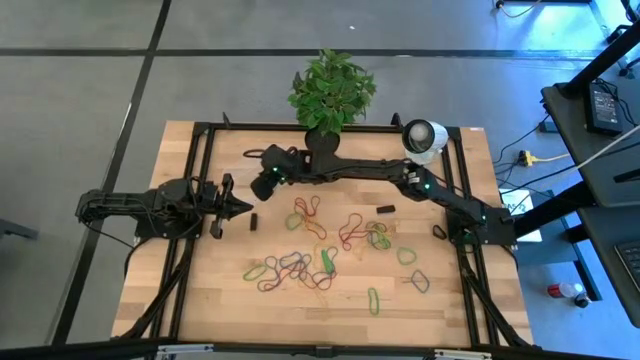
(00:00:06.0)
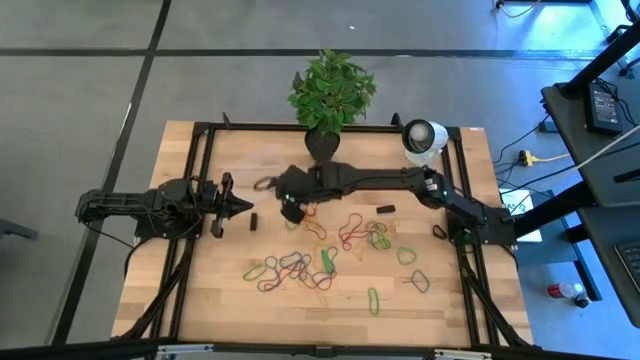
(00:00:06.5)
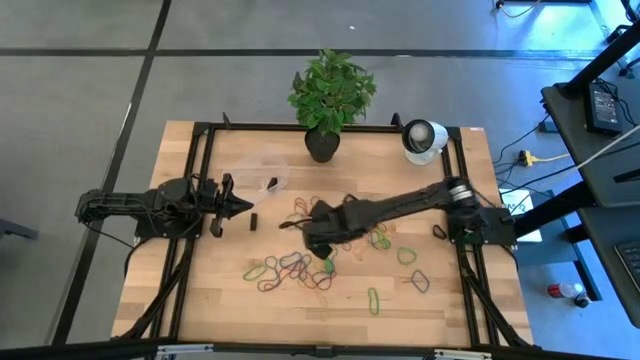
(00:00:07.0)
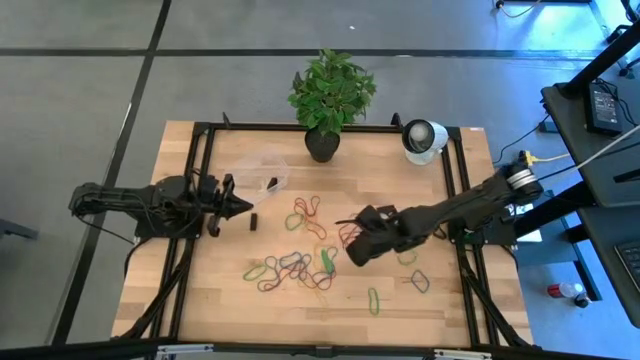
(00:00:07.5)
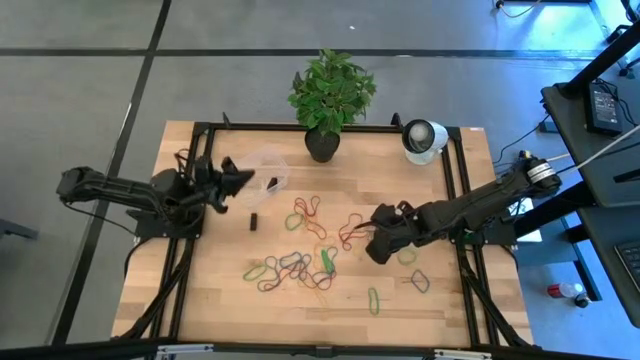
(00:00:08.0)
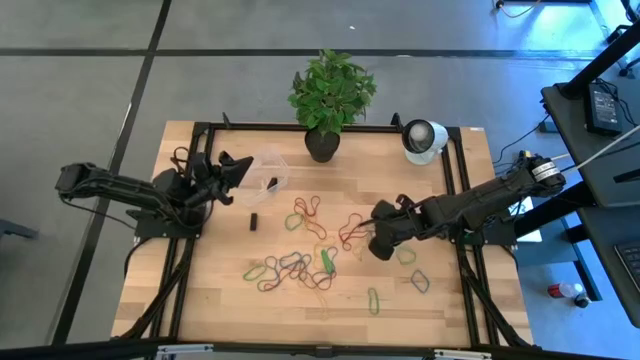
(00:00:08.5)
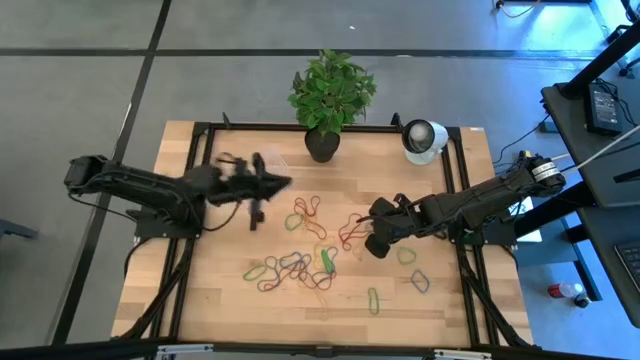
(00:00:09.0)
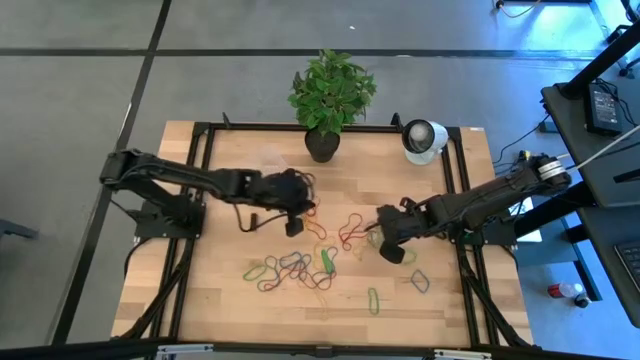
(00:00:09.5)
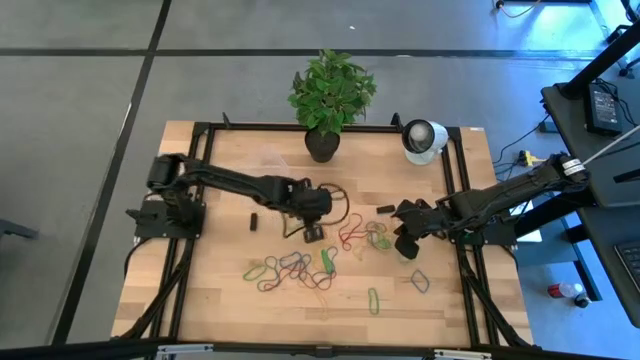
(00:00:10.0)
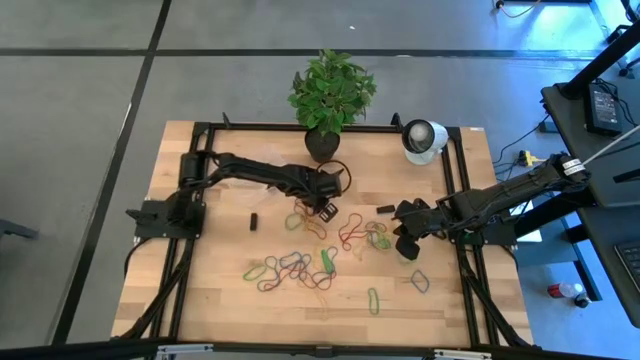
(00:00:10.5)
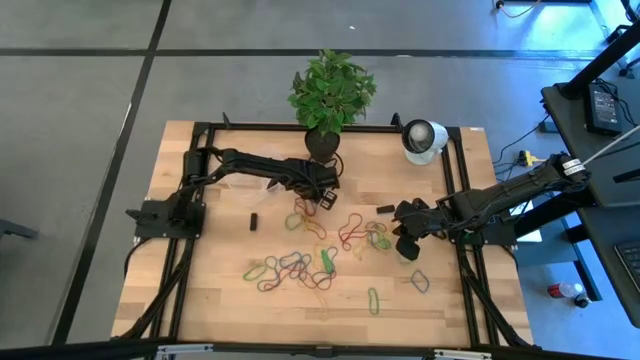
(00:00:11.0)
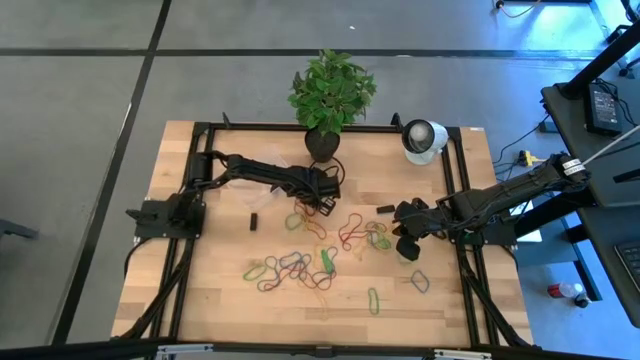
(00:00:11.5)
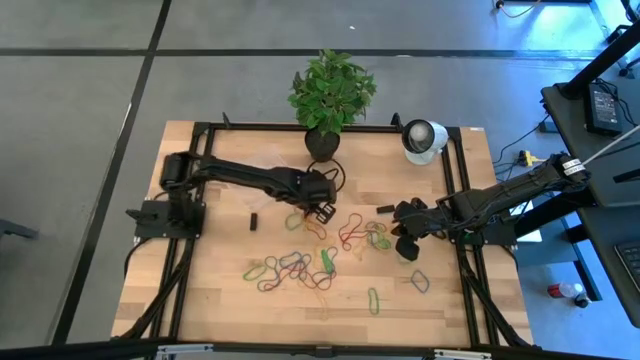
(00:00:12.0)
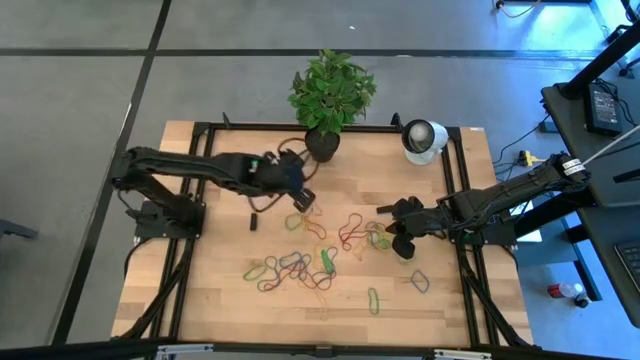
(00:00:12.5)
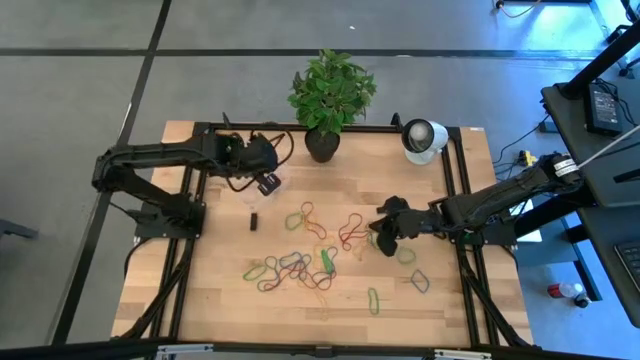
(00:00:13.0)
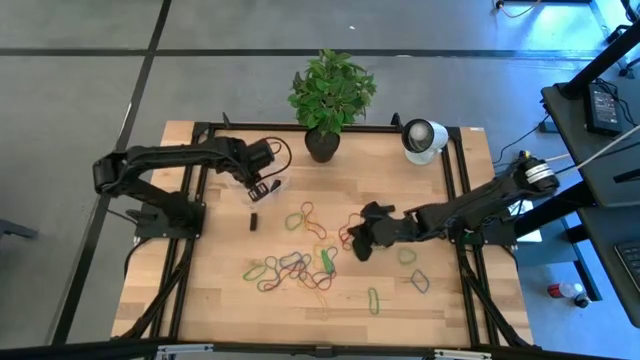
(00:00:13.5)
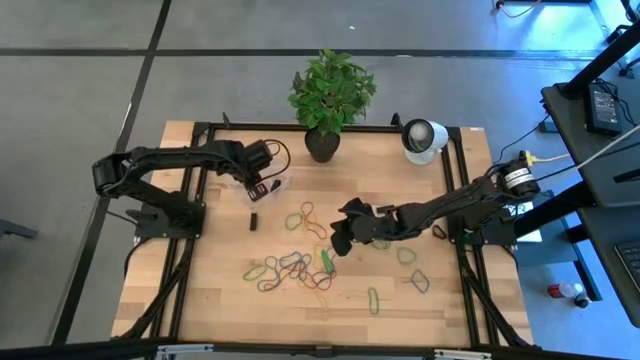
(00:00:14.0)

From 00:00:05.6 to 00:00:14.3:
Task: Pick and place rubber bands into bin
Put the red rubber band into the transparent bin

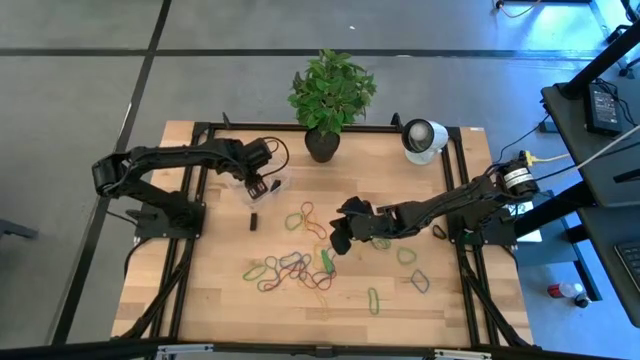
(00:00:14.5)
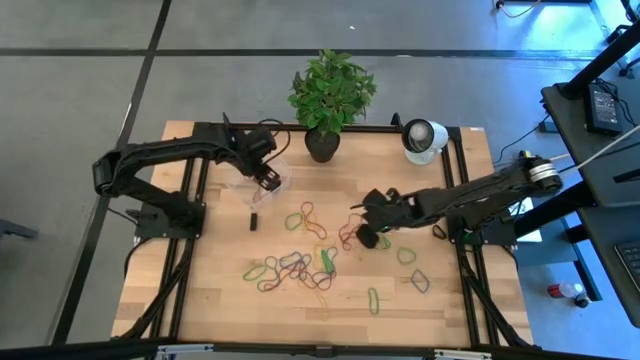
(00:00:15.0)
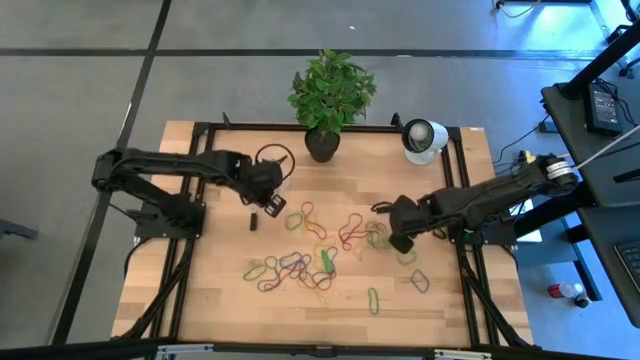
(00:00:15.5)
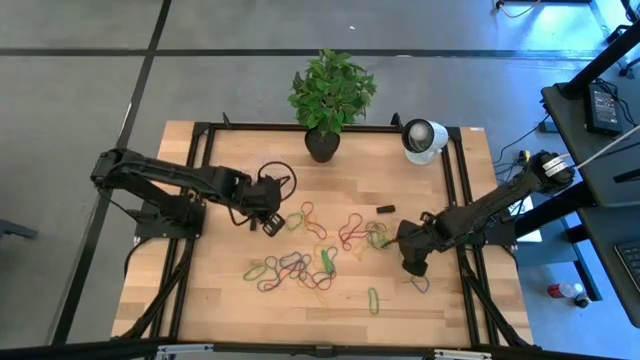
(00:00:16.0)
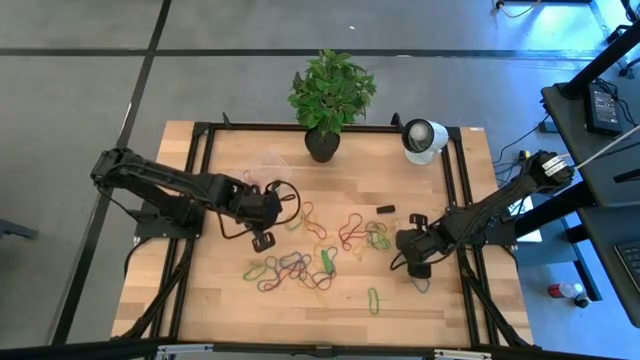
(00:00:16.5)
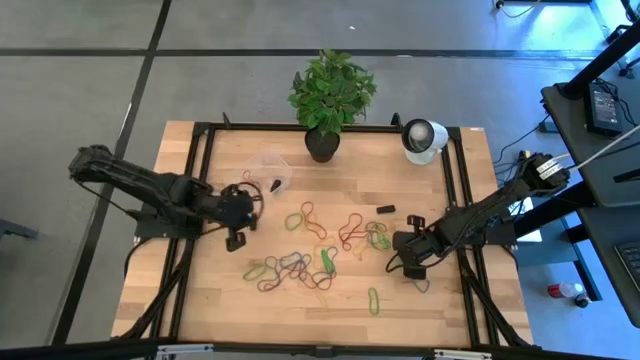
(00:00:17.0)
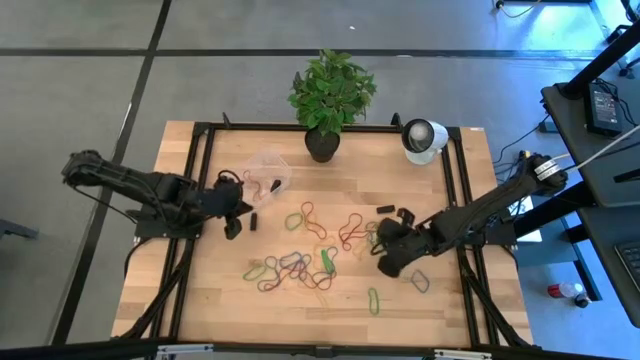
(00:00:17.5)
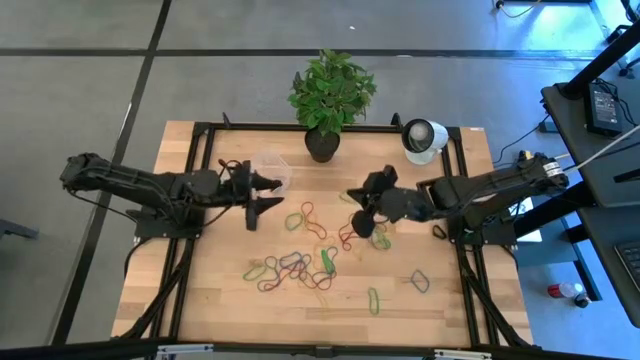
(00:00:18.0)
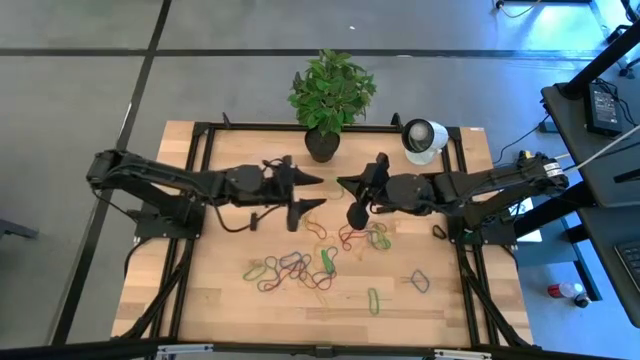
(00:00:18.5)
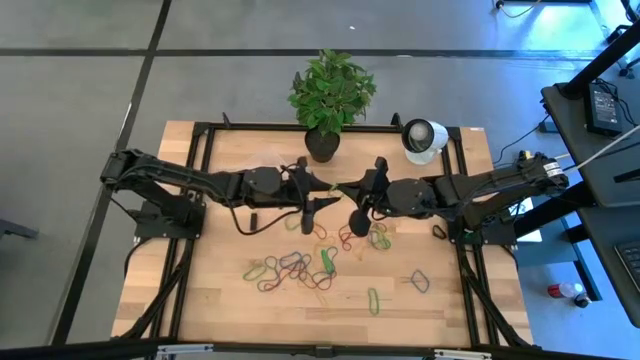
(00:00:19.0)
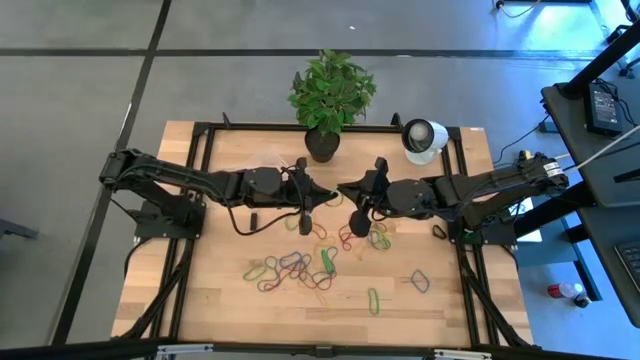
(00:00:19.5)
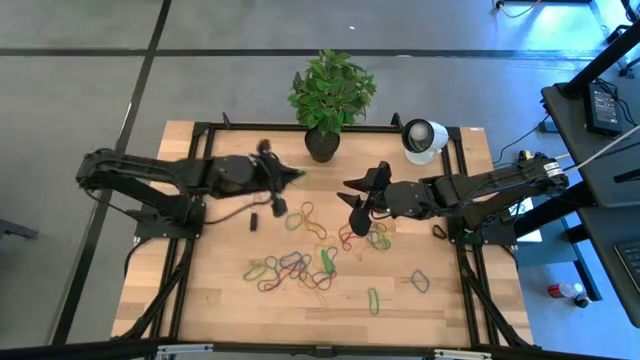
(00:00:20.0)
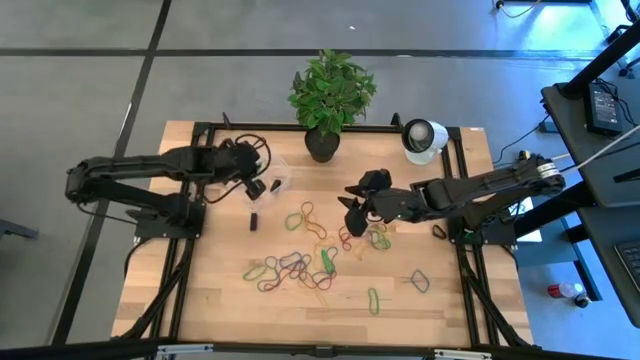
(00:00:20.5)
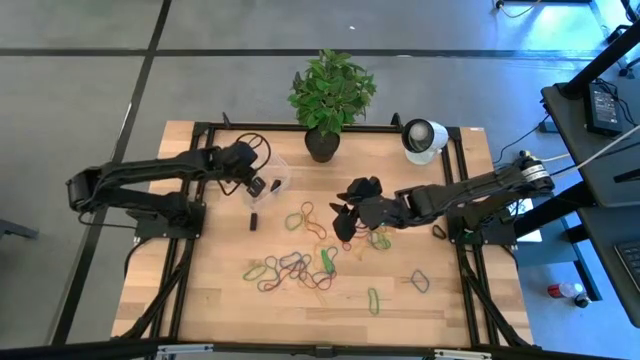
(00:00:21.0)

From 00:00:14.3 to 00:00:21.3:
Put the green rubber band into the transparent bin

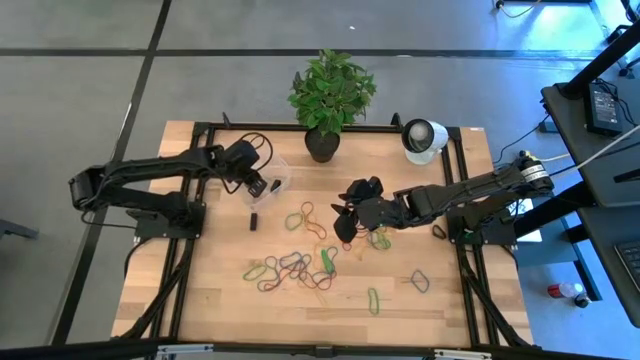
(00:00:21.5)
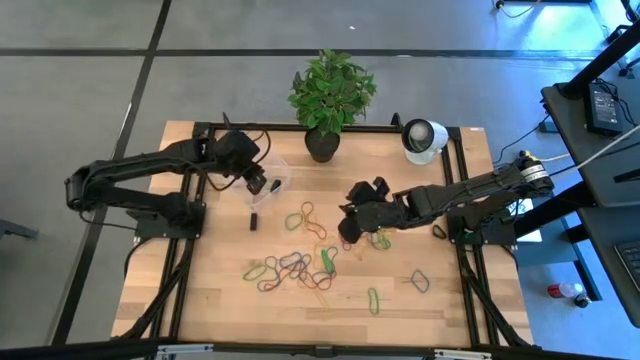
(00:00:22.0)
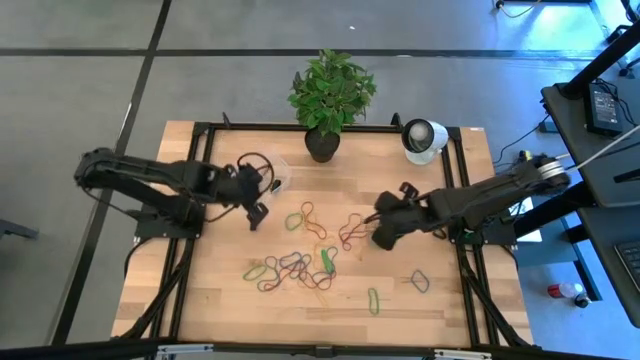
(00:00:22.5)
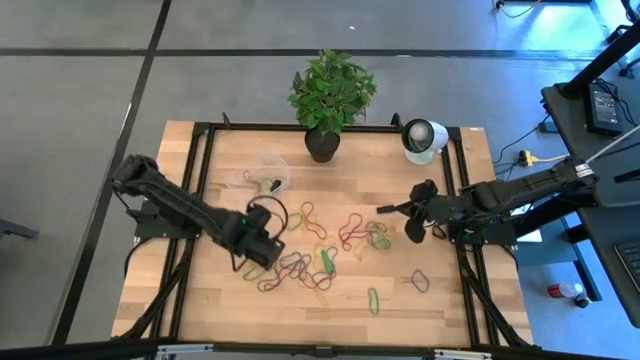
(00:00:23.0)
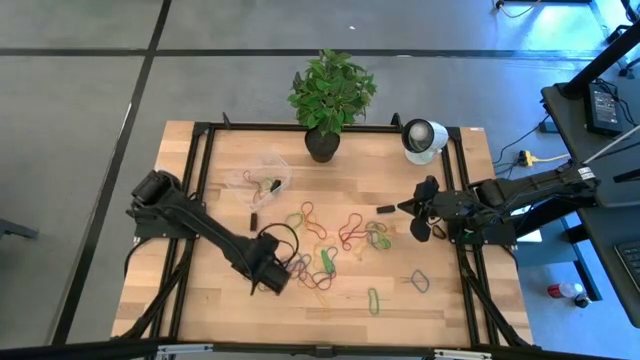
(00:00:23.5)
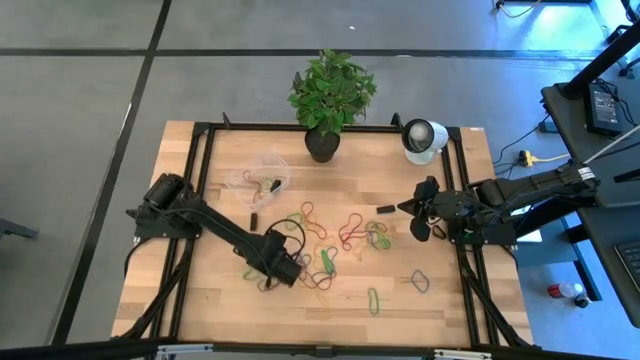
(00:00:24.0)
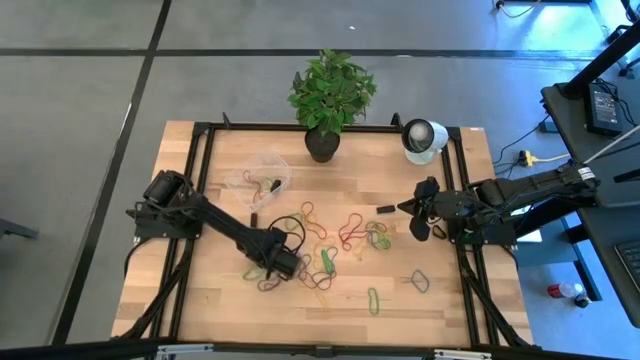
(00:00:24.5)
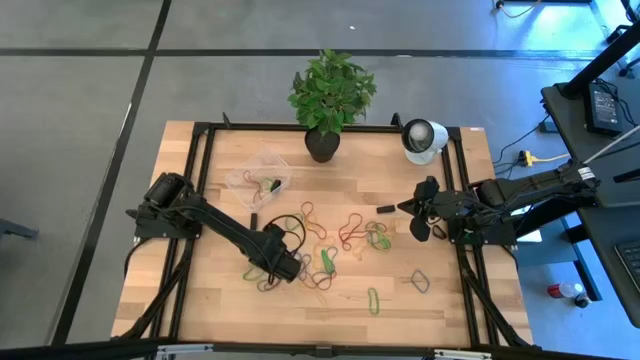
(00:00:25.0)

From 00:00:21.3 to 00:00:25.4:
Put the blue rubber band into the transparent bin

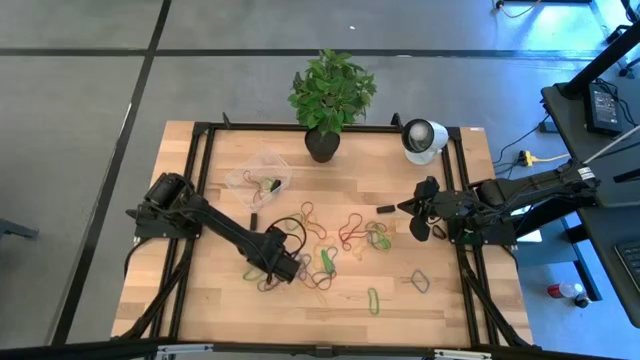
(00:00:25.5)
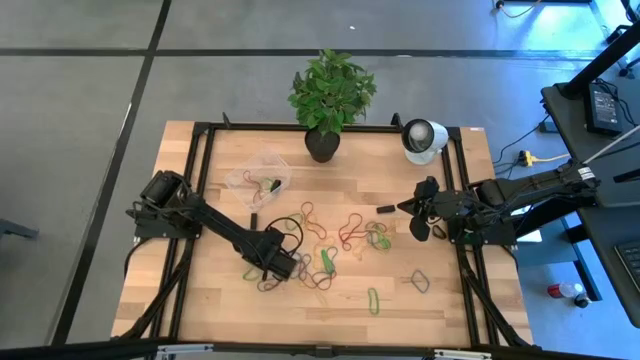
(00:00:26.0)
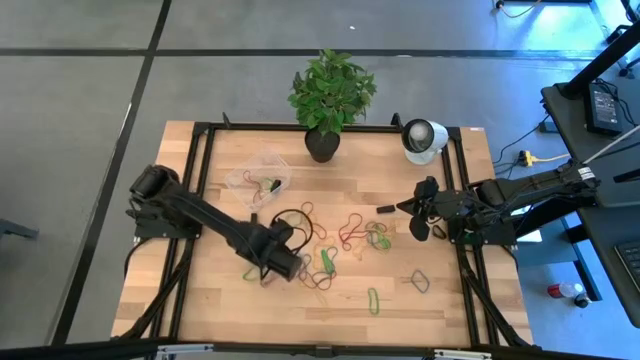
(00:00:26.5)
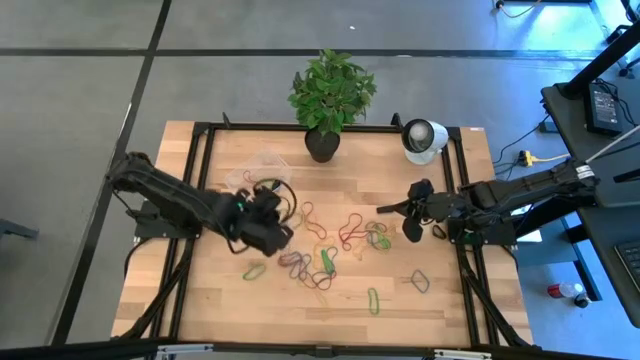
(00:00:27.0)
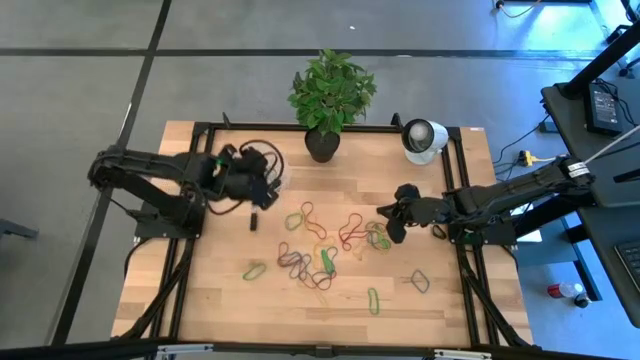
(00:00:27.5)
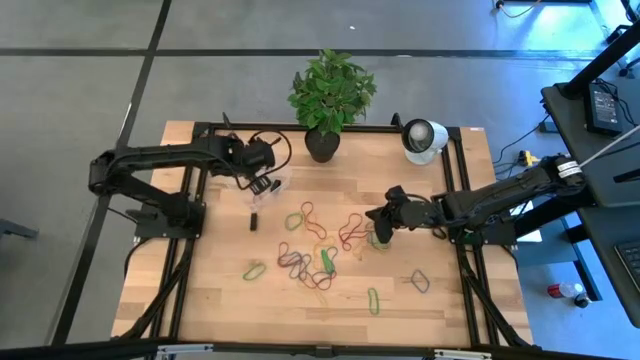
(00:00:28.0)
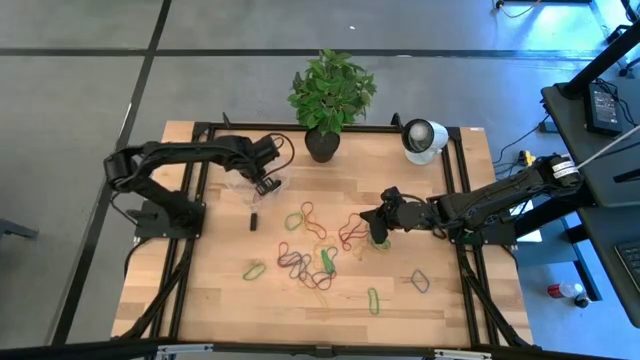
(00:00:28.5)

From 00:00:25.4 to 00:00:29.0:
Put the blue rubber band into the transparent bin
